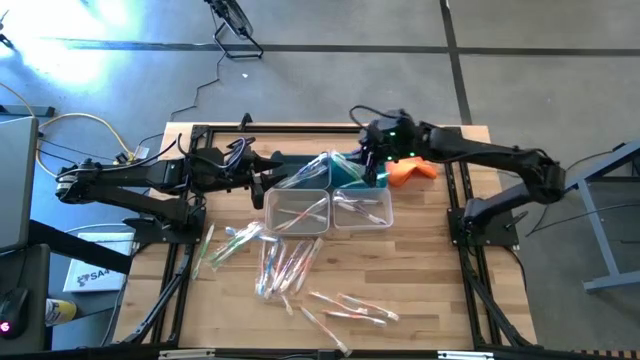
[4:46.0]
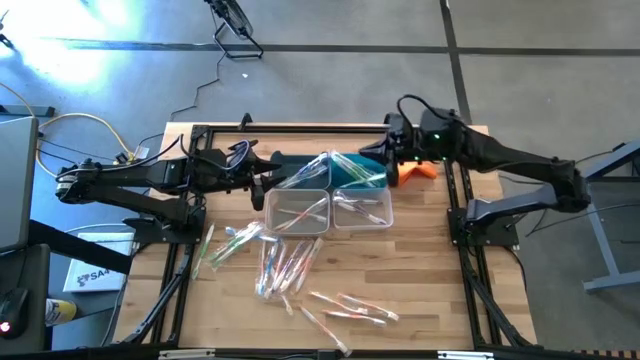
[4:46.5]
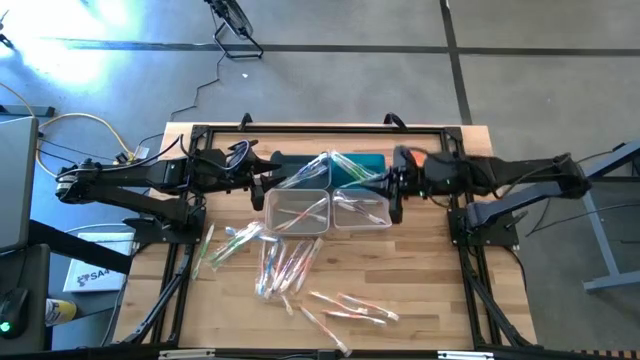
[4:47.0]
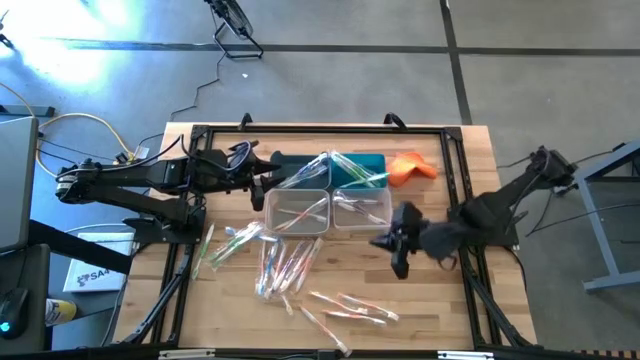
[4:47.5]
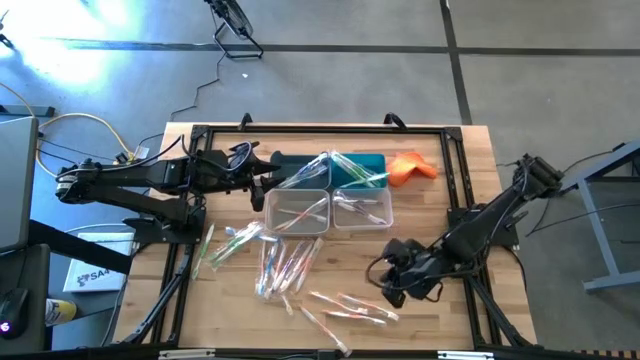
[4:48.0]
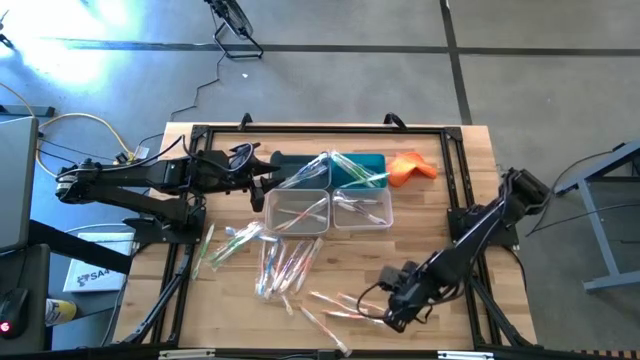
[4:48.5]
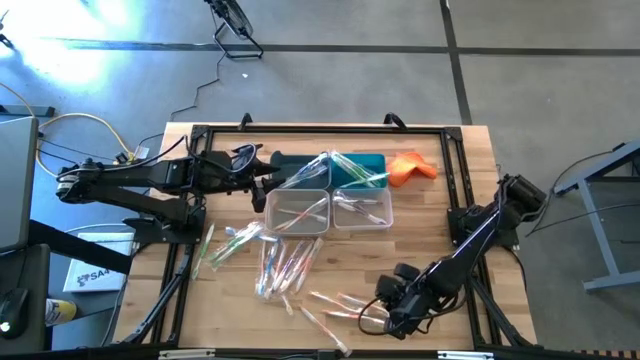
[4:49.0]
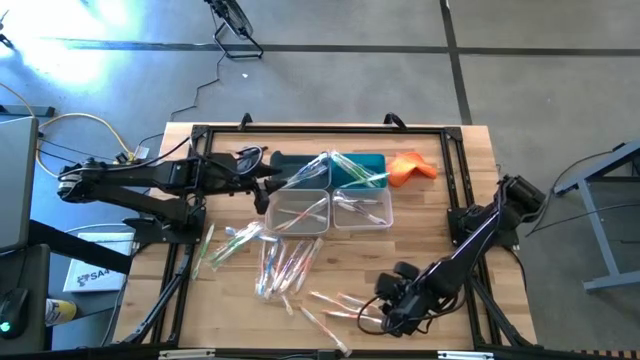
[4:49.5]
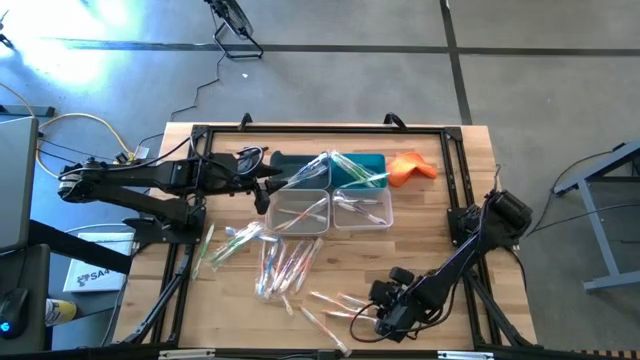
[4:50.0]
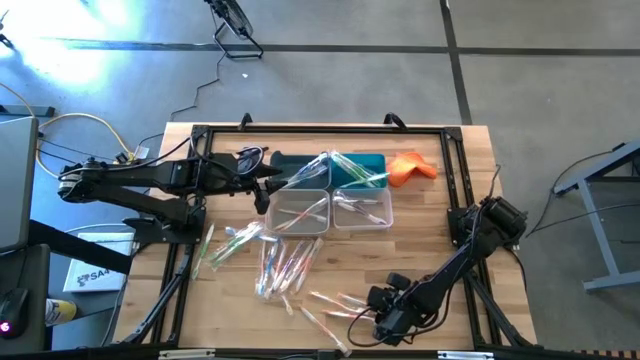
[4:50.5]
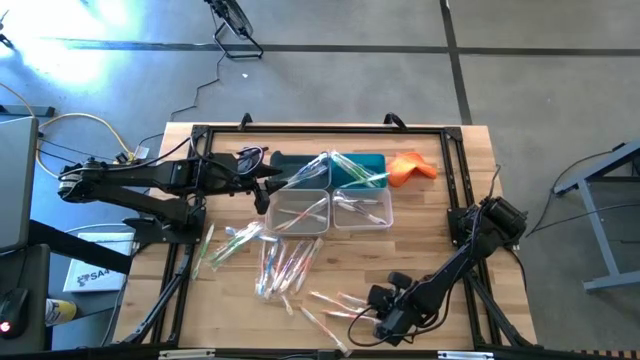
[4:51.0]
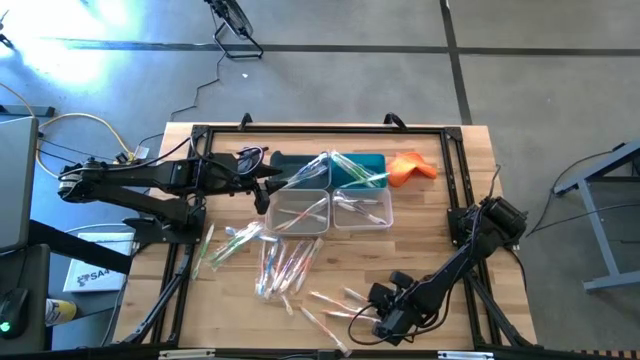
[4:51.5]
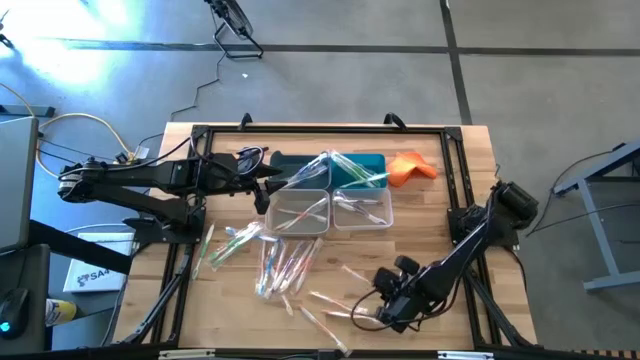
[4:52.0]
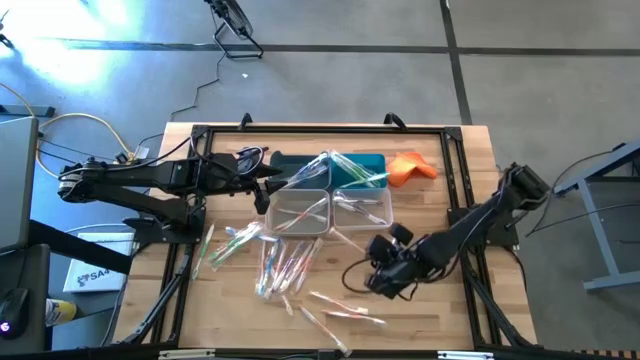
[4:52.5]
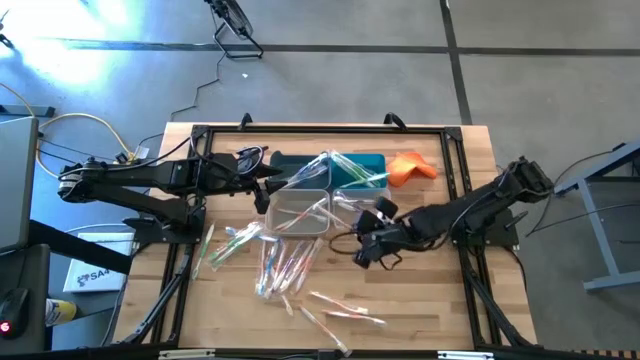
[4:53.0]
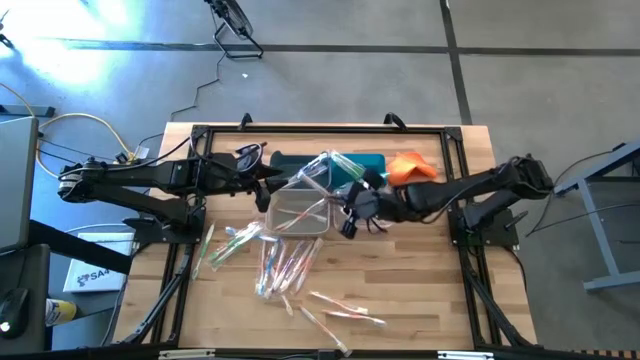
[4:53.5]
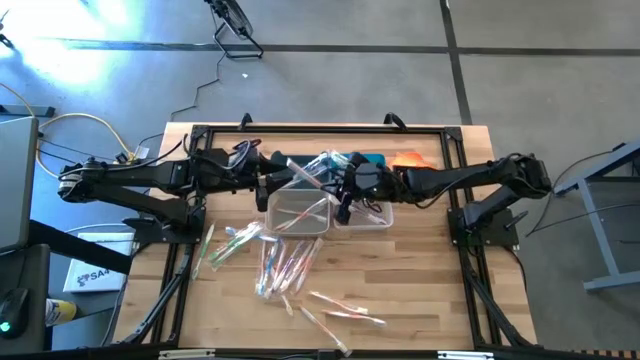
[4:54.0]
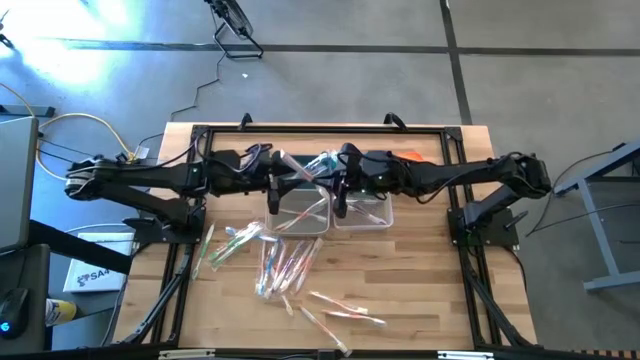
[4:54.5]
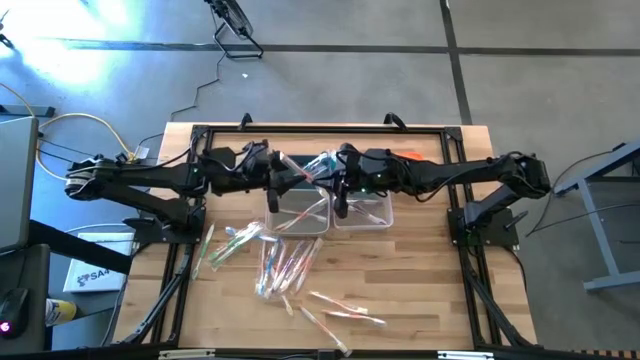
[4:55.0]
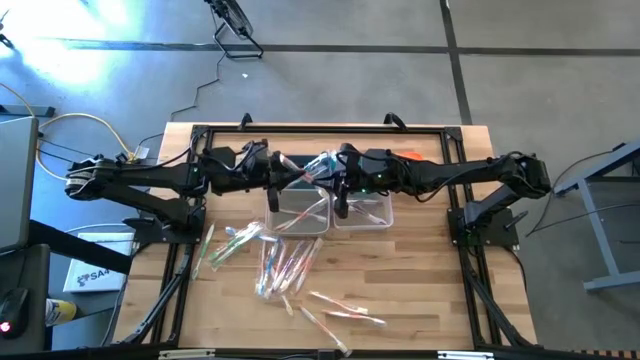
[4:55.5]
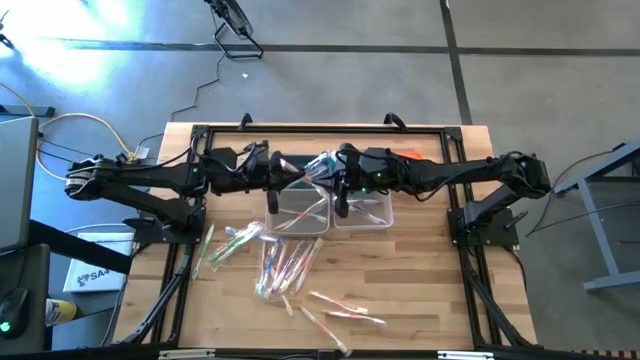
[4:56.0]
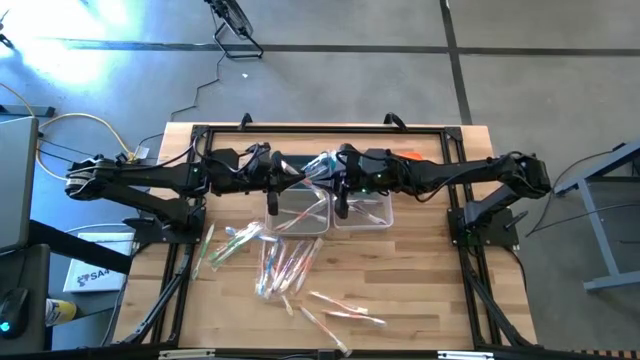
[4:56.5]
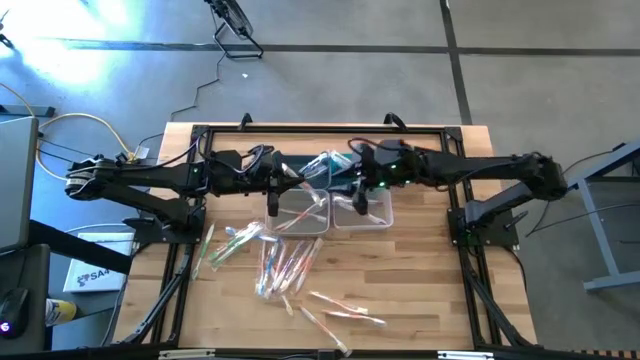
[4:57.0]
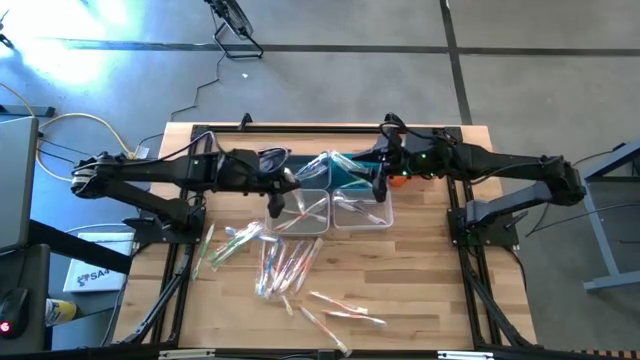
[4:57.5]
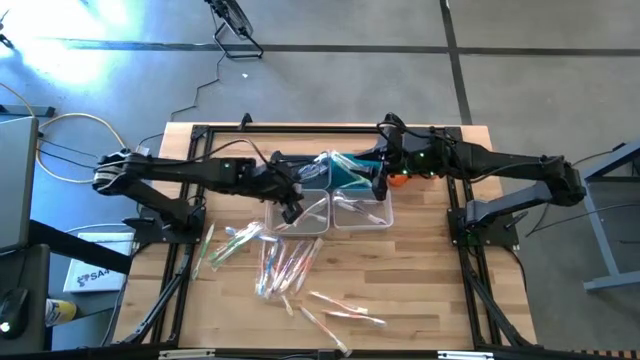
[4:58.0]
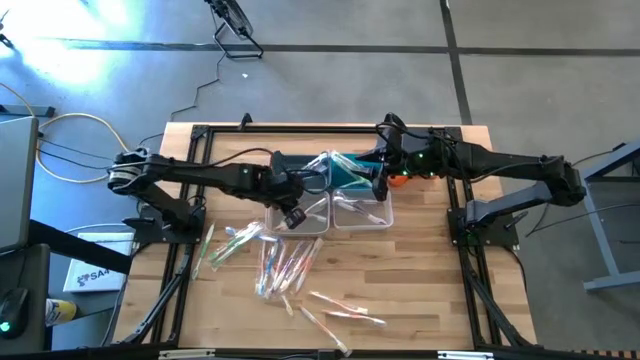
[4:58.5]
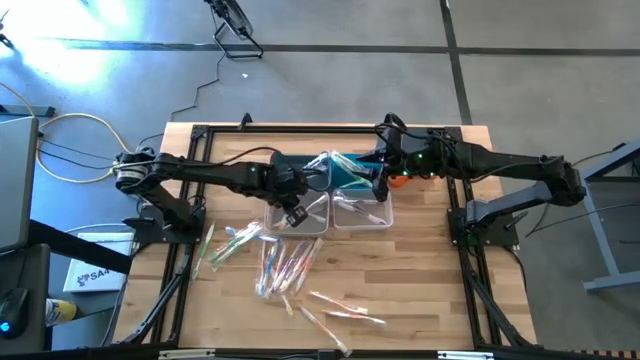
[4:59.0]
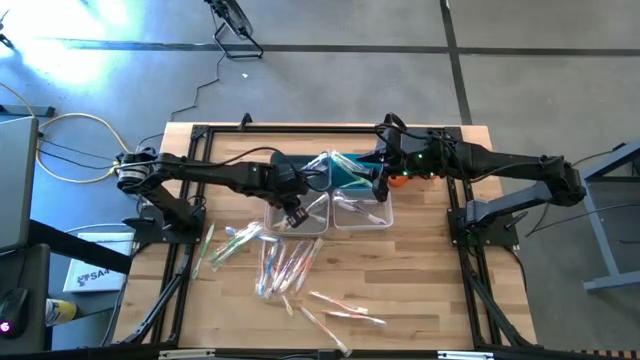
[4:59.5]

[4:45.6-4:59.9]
Task: Pick & Place Toothbrushes
Put the orange toothbrush into the gray bin

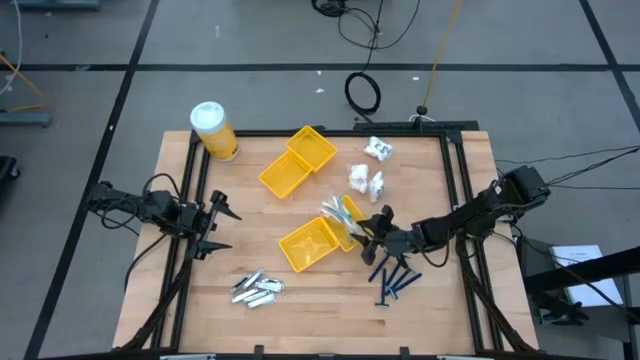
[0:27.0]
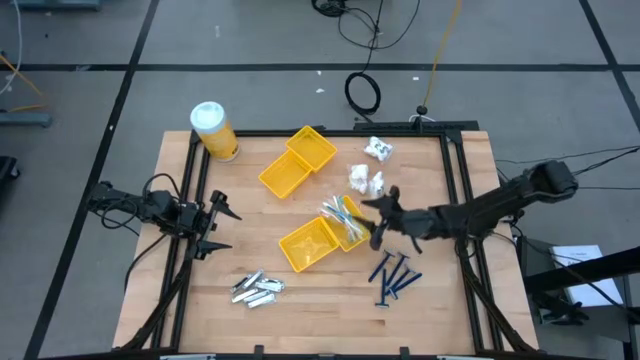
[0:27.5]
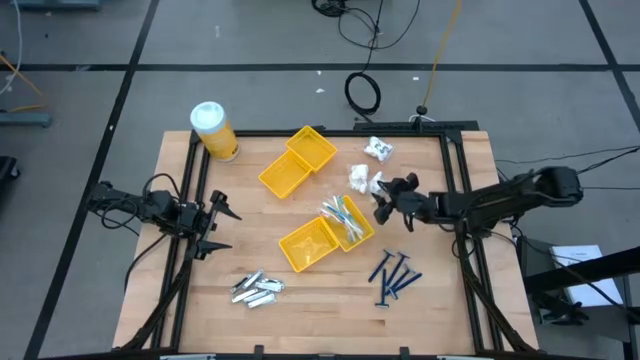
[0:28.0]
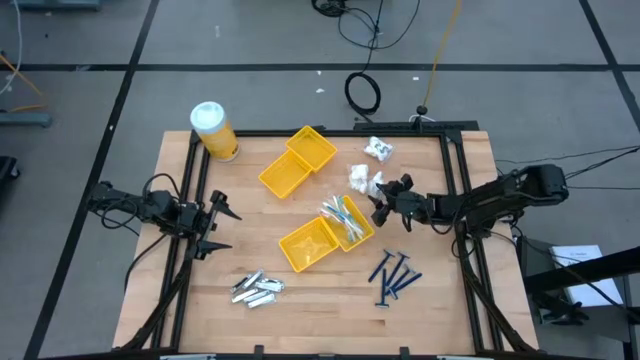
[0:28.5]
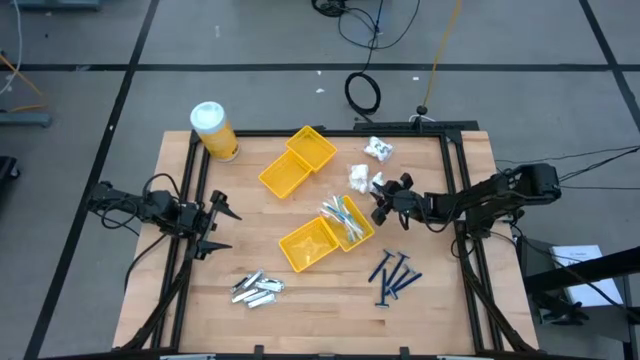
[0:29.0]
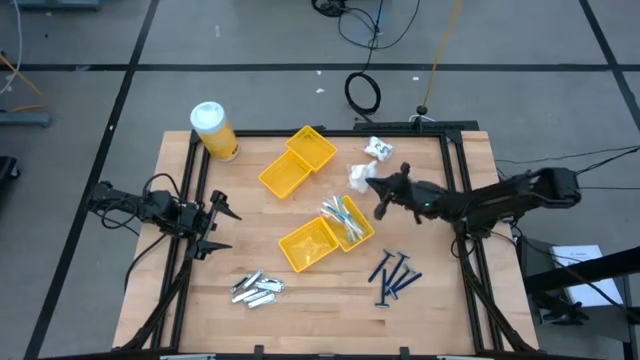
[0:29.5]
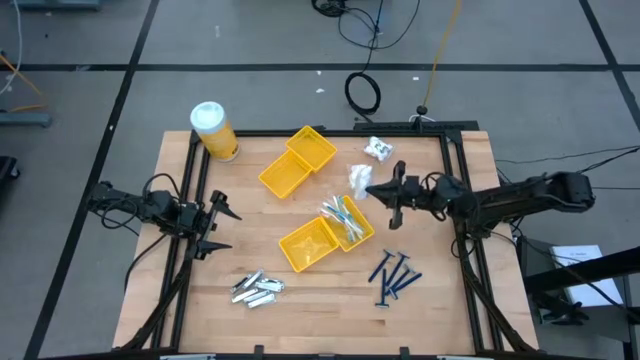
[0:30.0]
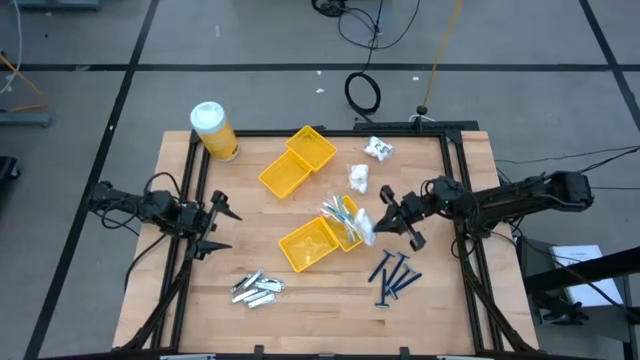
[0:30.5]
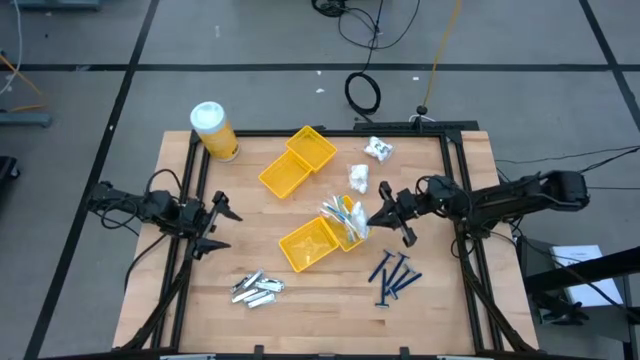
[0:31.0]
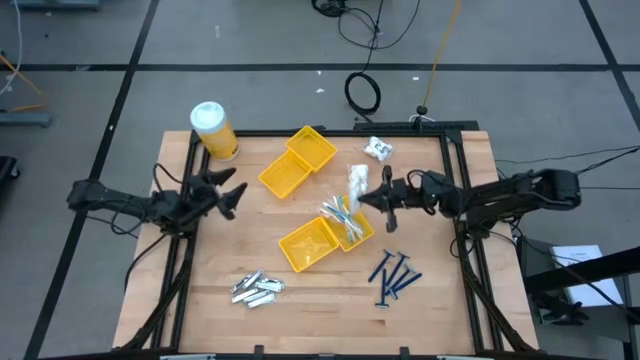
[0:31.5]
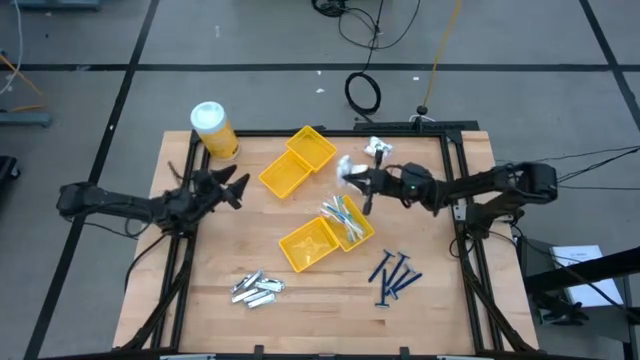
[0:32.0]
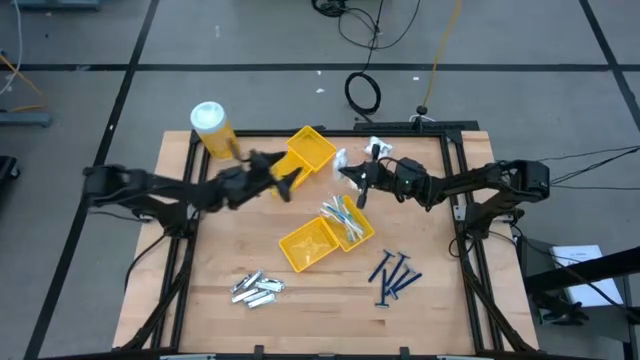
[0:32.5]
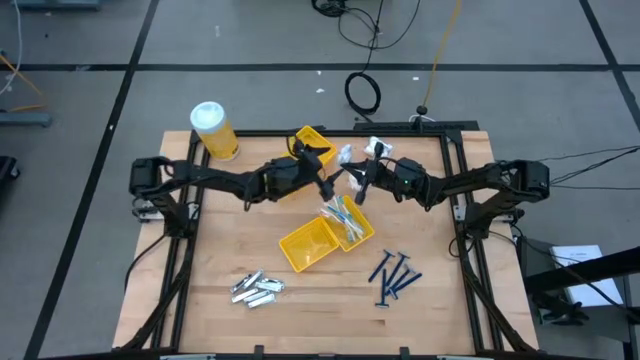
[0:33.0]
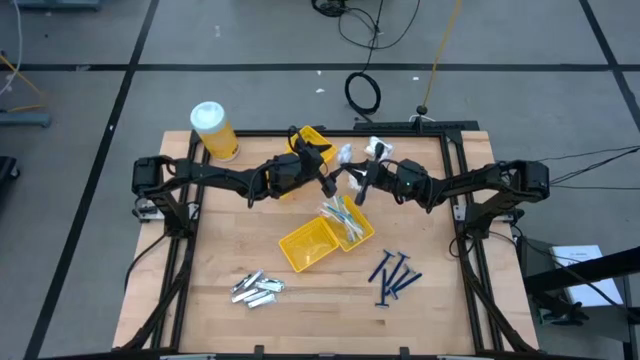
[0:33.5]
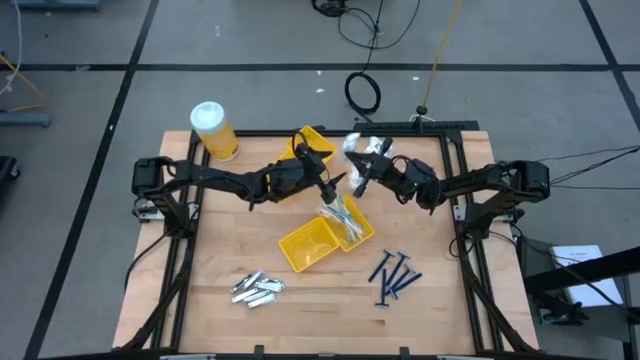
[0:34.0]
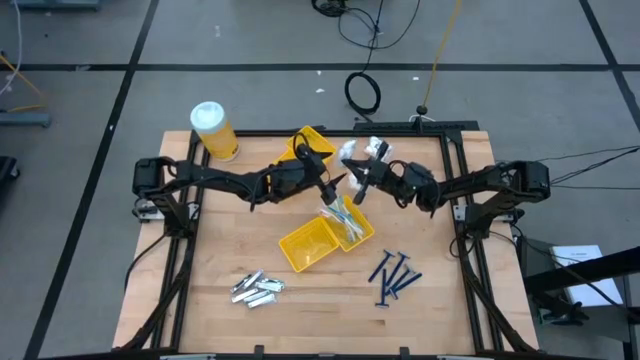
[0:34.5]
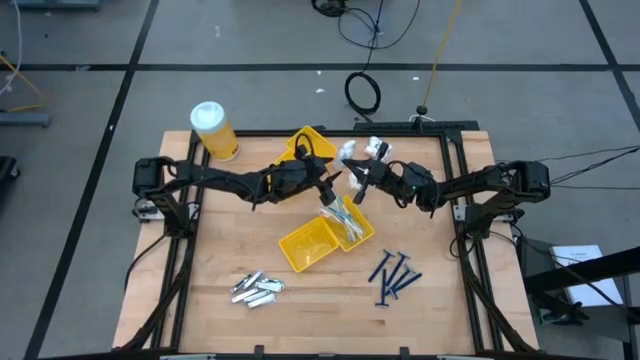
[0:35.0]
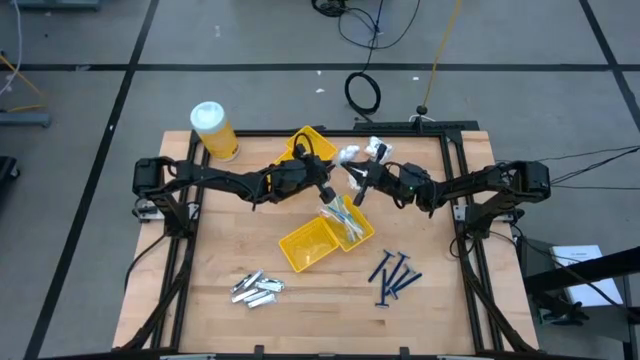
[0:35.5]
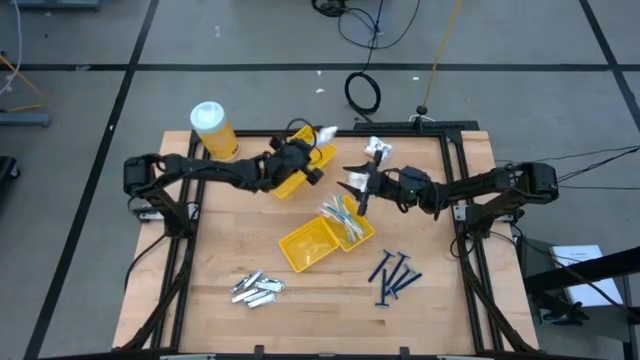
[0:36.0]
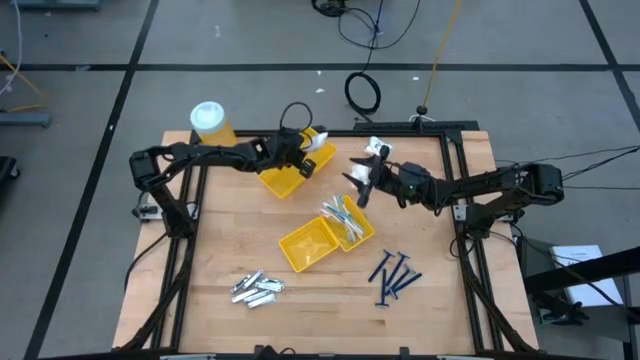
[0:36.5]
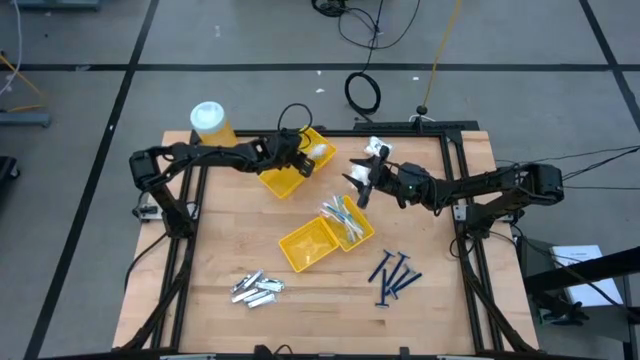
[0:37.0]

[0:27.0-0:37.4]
Task: Pick & Place Travel size toiletries
Put the cotton pack into the top right yellow basket
